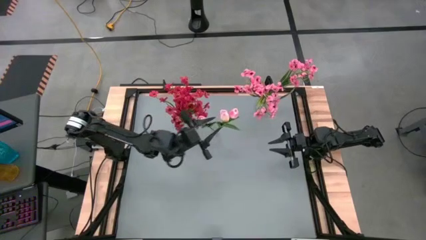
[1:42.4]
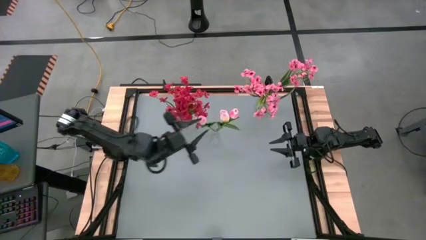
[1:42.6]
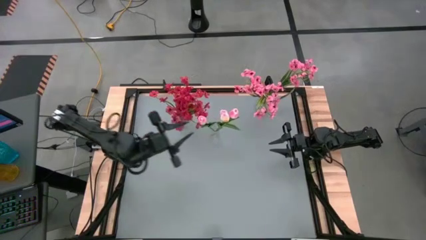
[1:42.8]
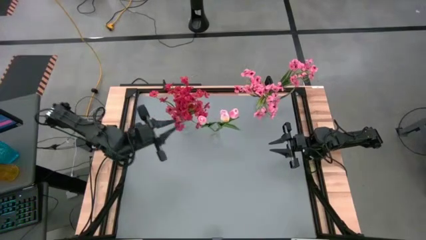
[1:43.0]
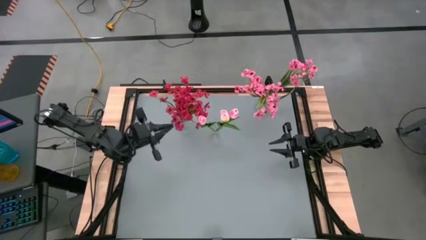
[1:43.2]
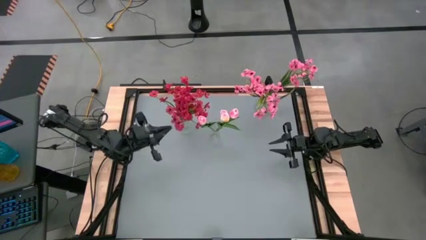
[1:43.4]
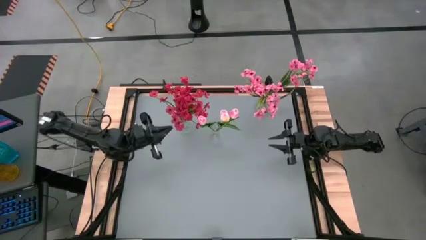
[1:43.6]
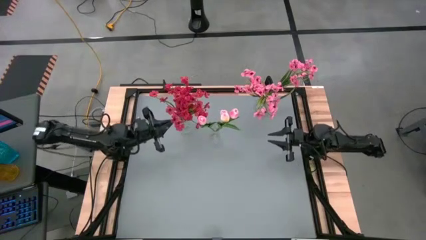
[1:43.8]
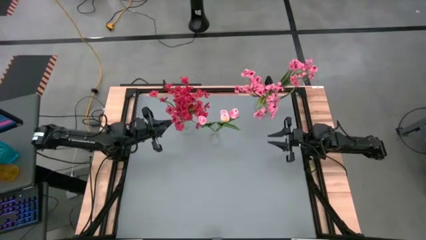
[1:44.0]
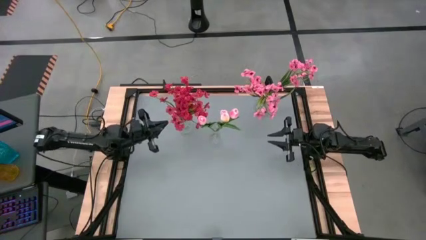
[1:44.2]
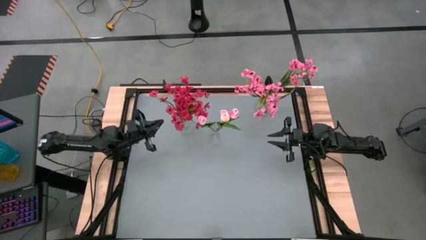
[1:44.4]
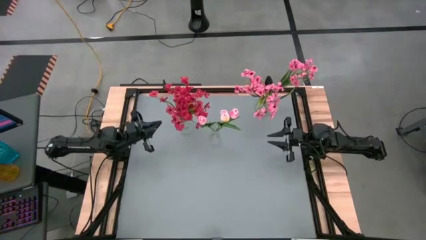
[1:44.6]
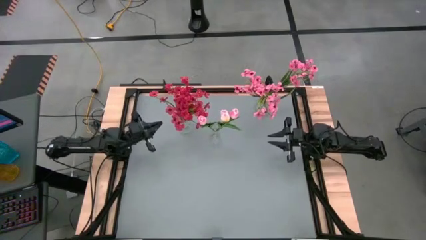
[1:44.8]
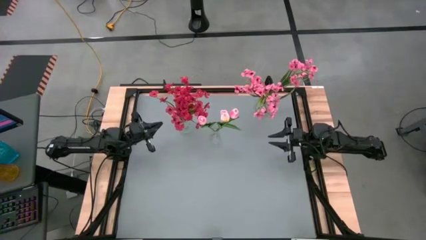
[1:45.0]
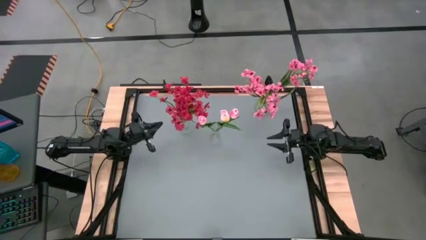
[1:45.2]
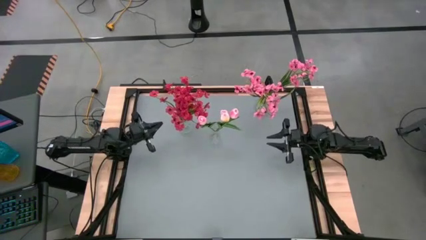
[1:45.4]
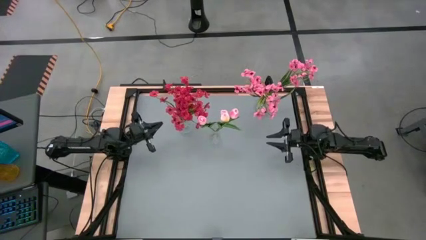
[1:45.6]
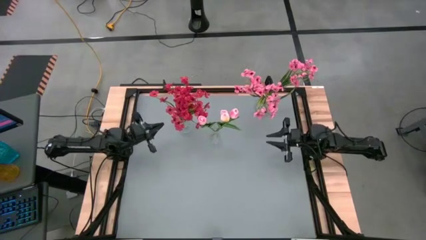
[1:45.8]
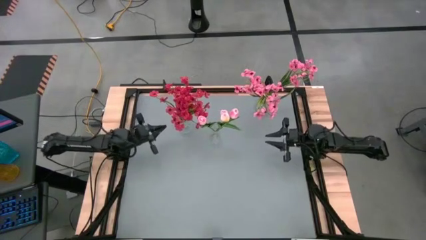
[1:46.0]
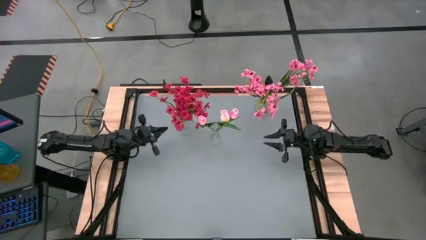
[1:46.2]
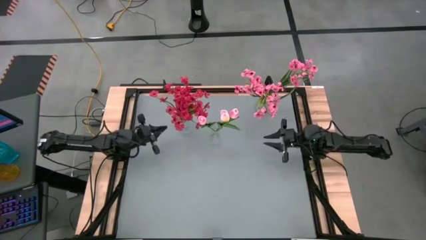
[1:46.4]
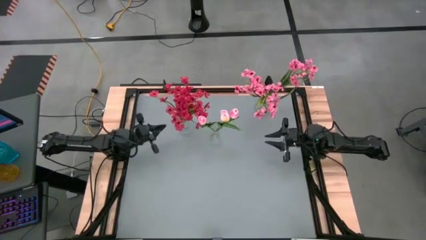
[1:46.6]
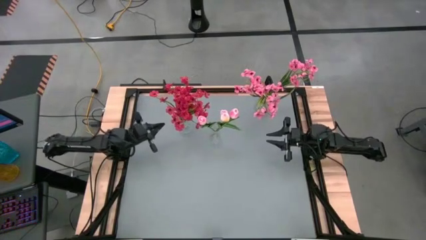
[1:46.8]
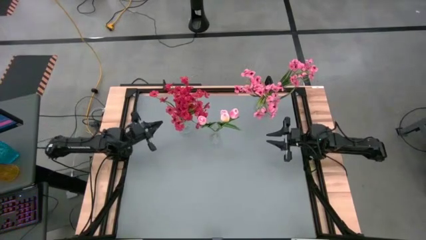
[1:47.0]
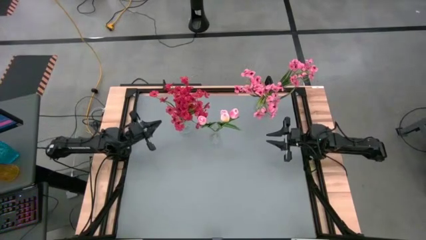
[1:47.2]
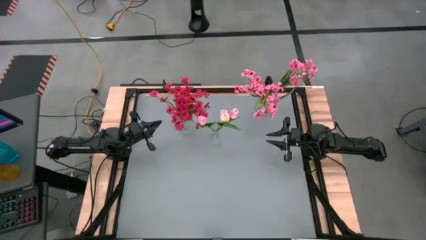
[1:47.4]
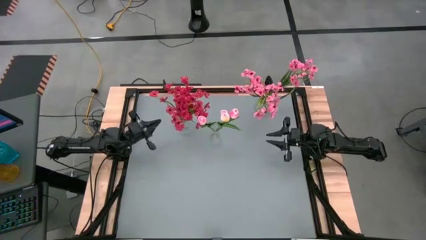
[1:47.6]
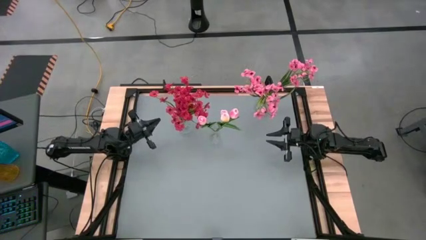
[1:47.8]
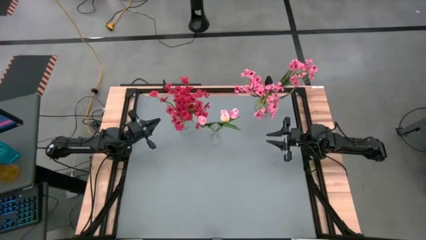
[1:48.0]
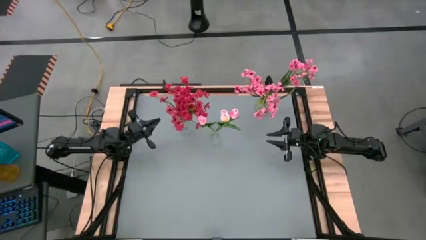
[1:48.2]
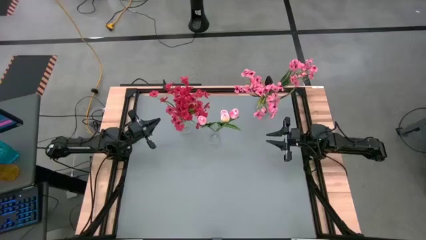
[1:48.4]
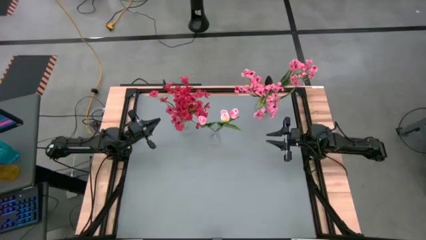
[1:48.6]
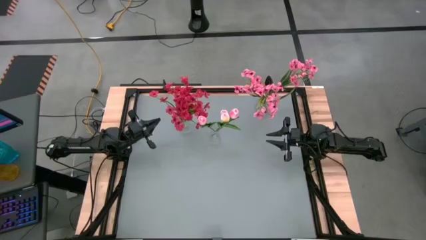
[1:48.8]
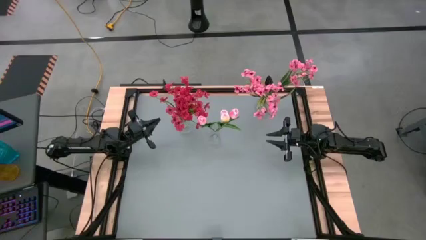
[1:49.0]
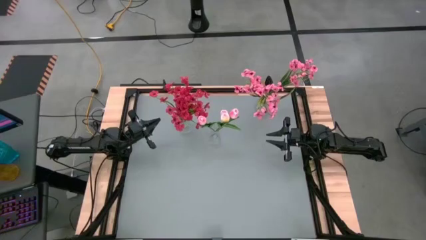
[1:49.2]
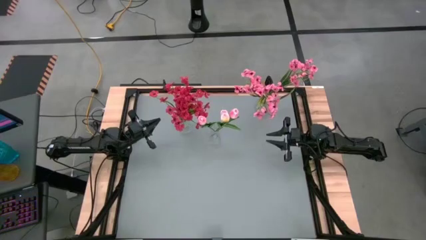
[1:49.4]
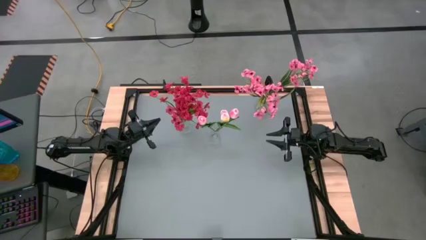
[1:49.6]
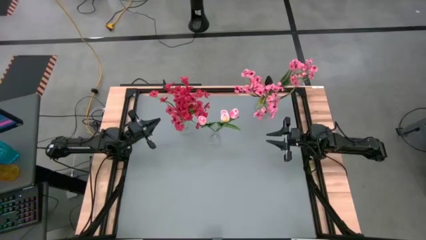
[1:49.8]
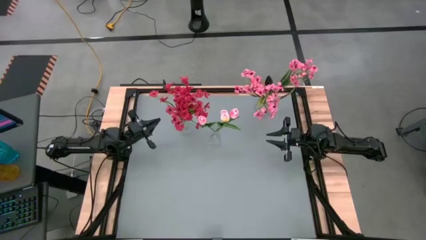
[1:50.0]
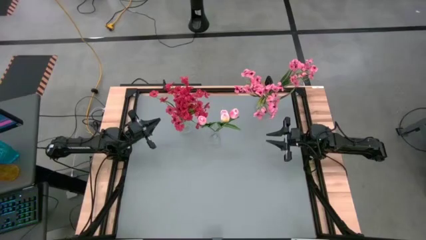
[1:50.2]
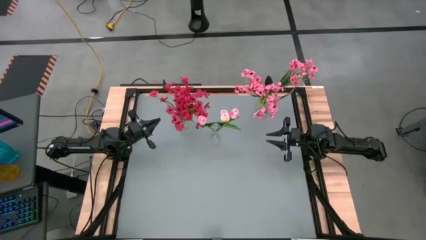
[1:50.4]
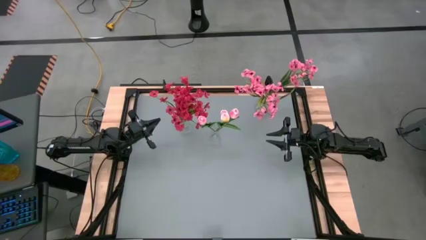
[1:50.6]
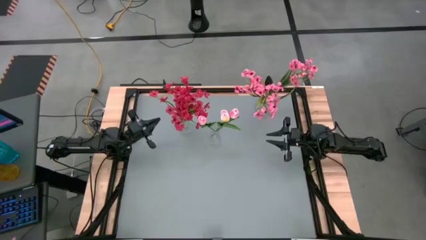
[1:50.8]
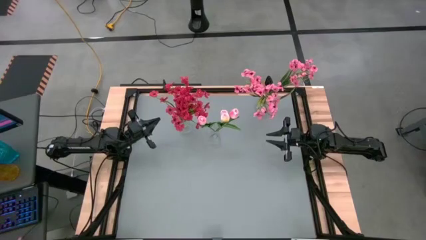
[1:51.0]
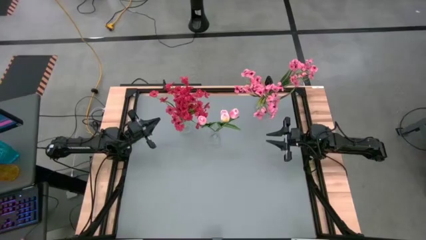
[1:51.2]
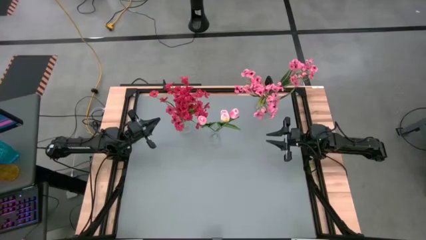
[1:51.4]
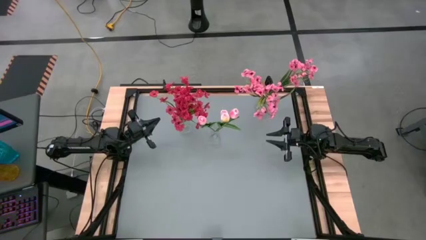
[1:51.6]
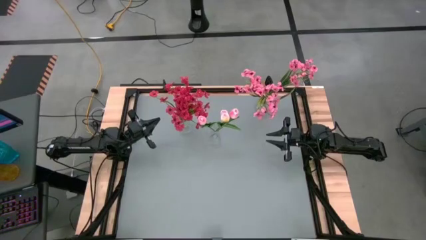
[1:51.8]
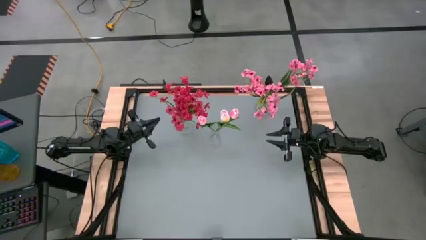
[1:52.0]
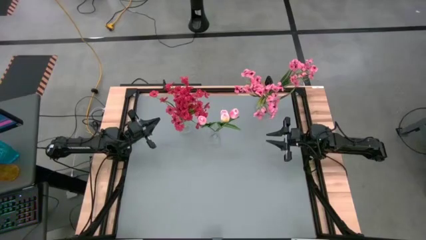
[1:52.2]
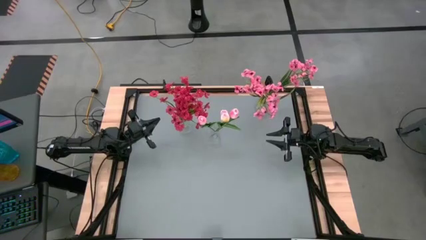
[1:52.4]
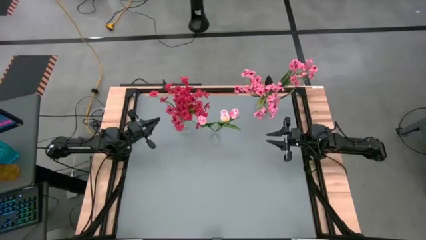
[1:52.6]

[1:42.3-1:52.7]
Task: Sort flowers into vase by color
Return to Home Position
